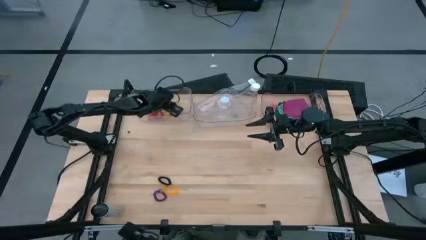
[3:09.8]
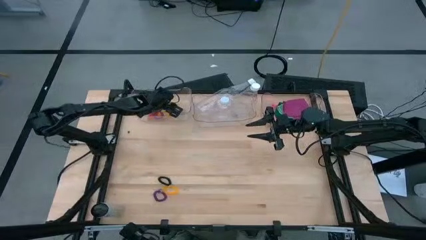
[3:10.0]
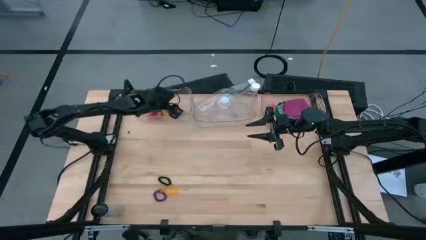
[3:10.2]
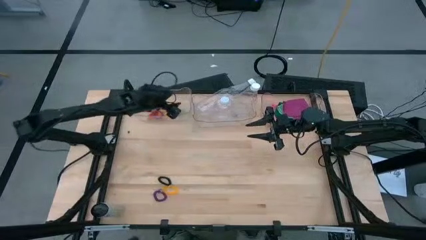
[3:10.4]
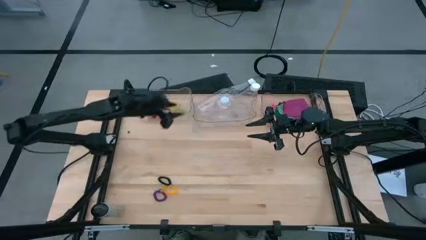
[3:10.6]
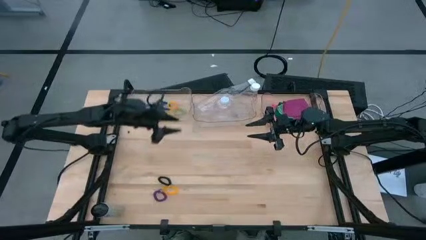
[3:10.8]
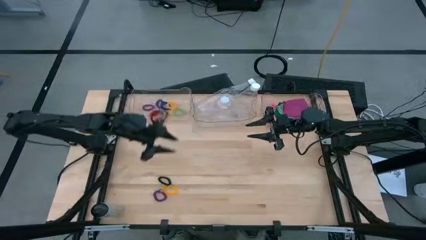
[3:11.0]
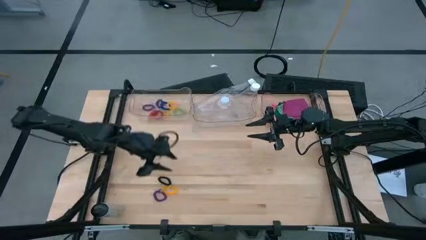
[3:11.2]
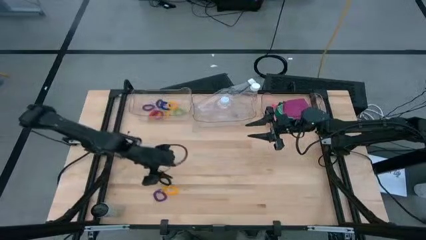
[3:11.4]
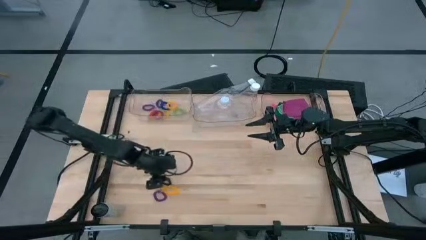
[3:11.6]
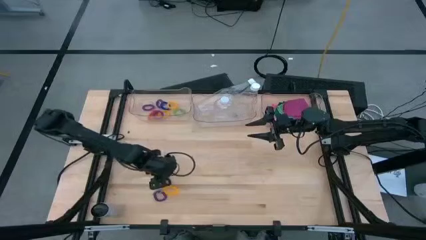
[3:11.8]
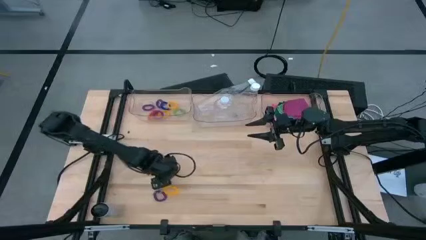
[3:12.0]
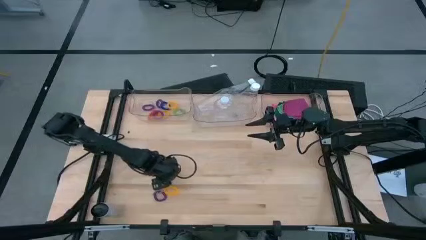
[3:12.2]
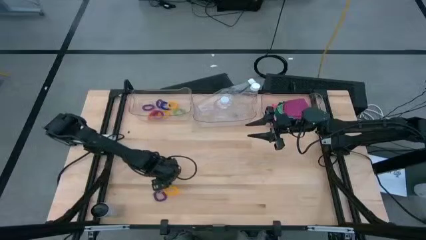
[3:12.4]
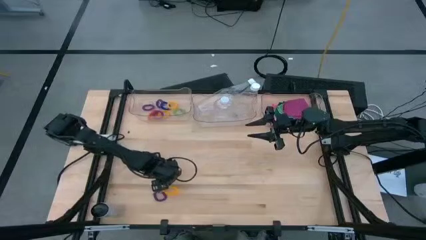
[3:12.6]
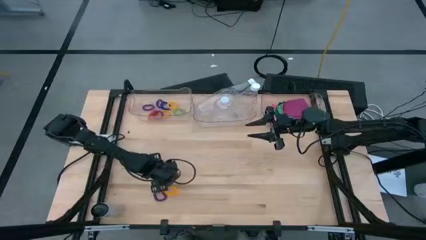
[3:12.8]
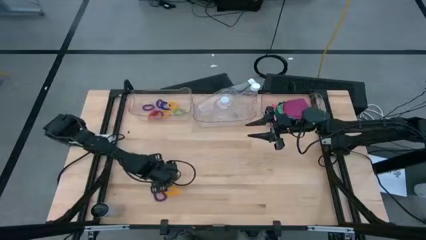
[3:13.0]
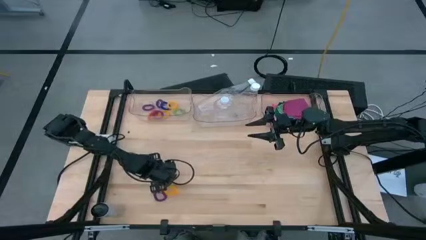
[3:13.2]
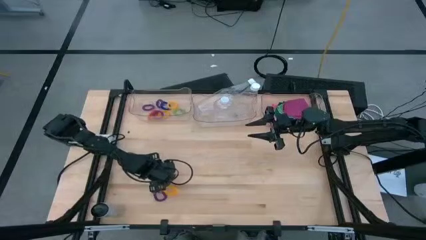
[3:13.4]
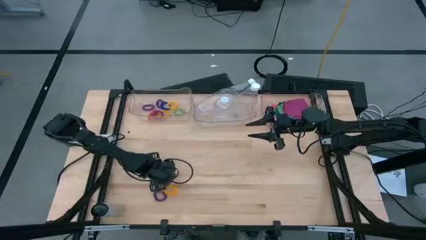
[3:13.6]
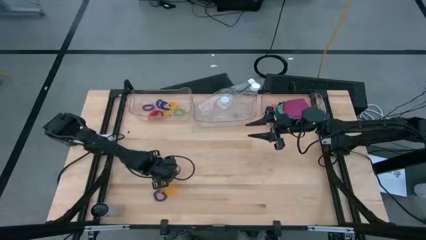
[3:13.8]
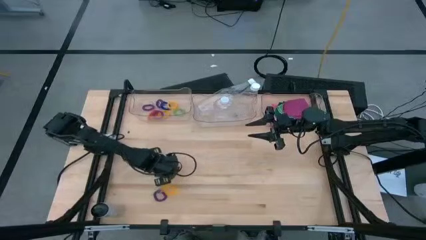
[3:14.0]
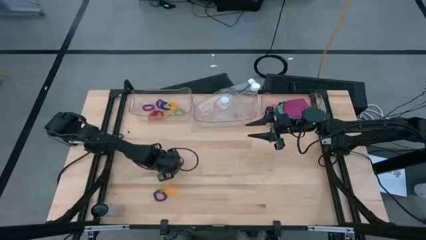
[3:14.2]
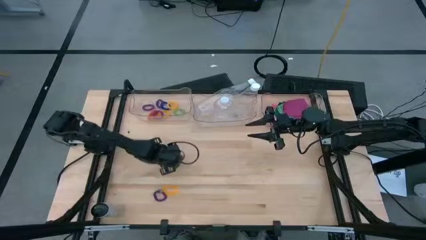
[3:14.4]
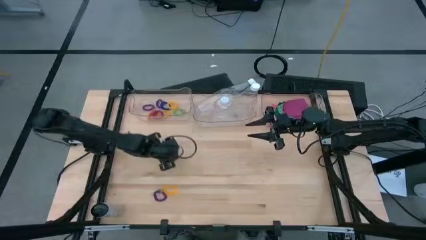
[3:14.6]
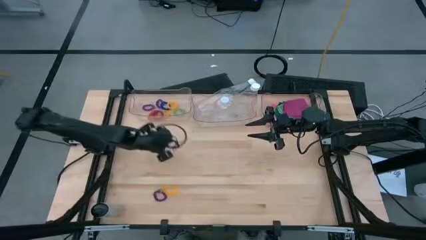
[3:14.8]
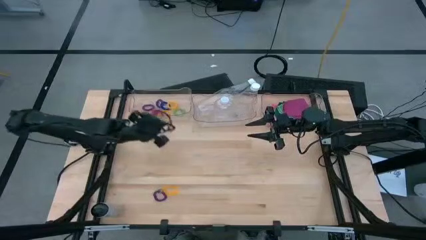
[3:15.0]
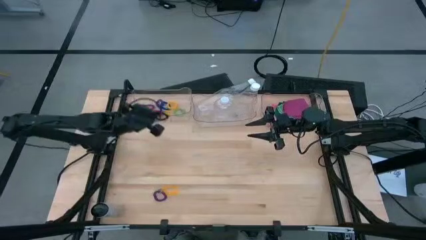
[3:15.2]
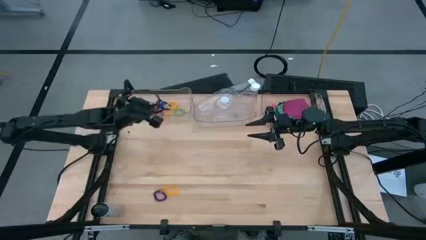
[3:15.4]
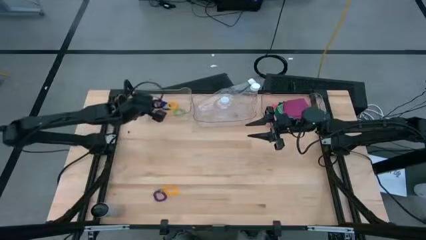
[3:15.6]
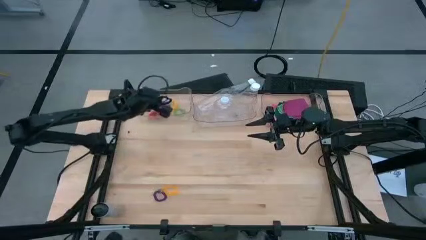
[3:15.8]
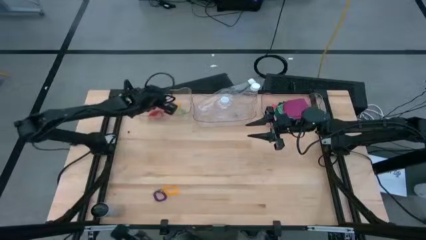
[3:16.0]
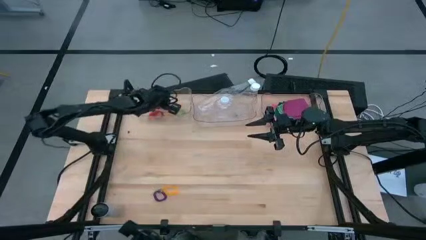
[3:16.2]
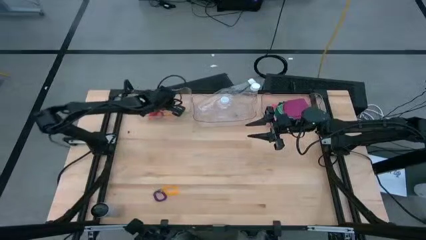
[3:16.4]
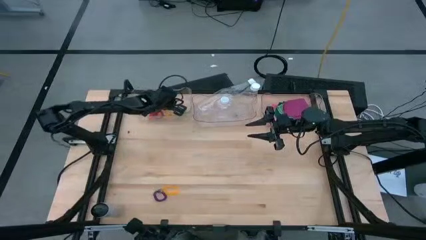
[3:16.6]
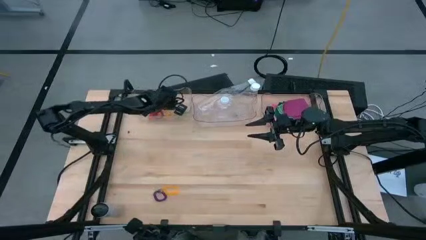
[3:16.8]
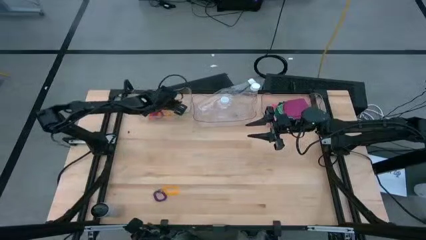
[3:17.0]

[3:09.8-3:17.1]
Task: Pick & Place Sports Items
Put the black spring keychain into the left transparent bin

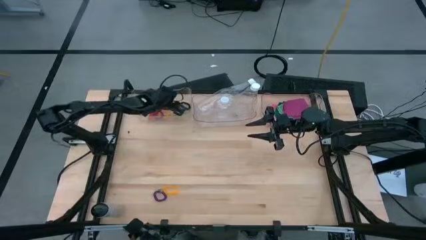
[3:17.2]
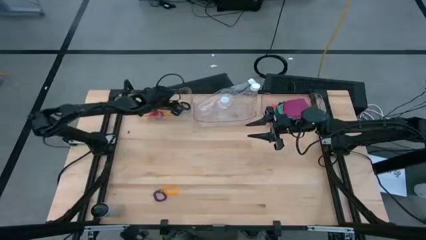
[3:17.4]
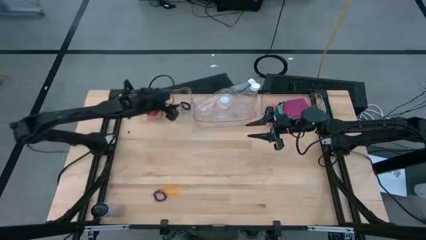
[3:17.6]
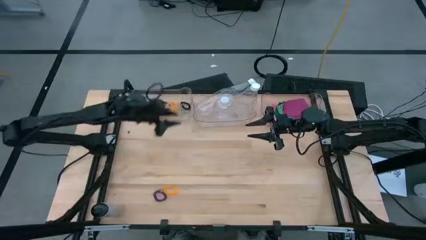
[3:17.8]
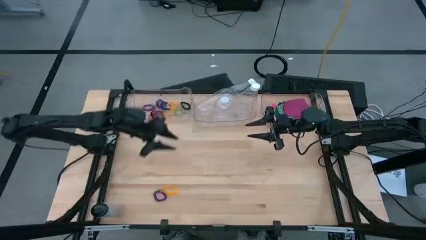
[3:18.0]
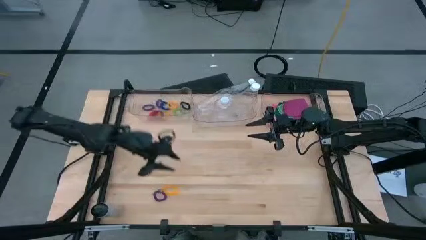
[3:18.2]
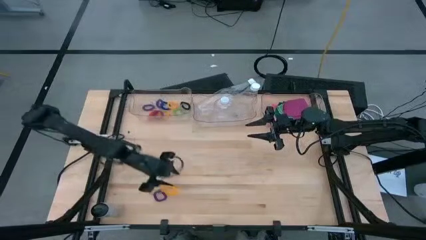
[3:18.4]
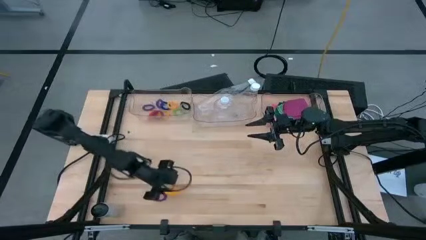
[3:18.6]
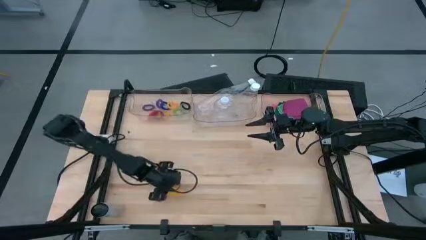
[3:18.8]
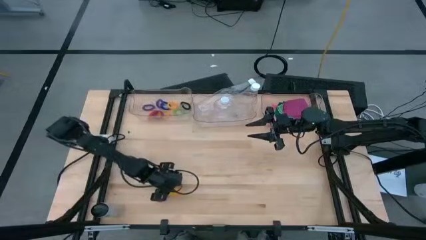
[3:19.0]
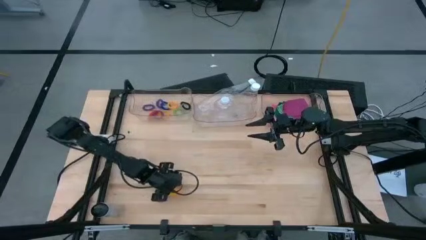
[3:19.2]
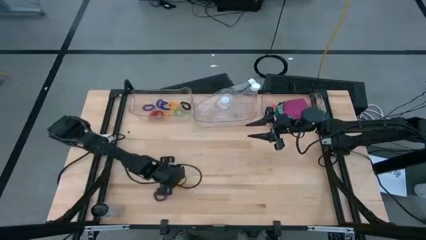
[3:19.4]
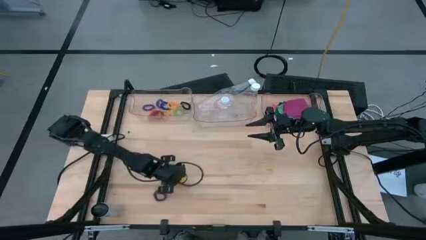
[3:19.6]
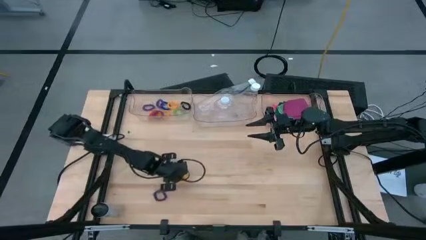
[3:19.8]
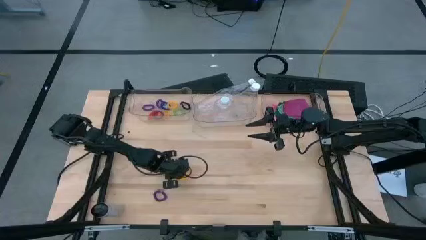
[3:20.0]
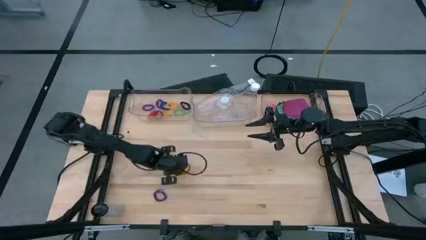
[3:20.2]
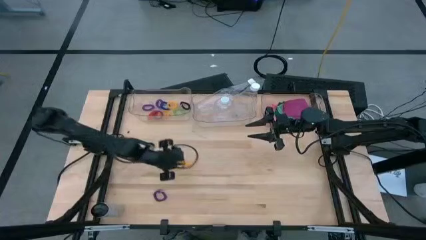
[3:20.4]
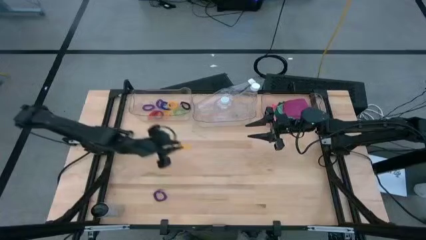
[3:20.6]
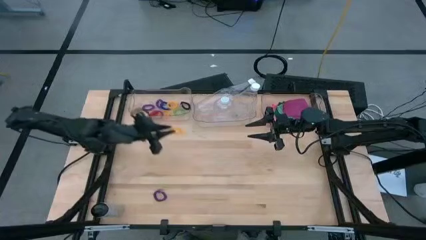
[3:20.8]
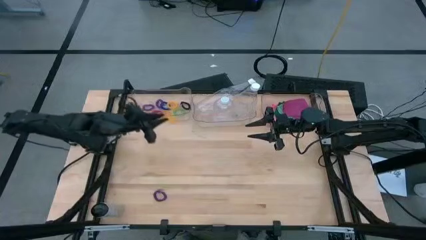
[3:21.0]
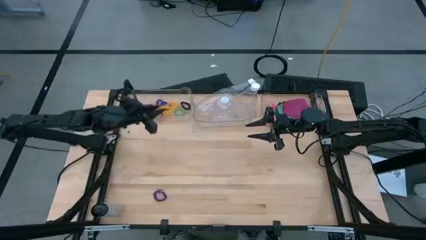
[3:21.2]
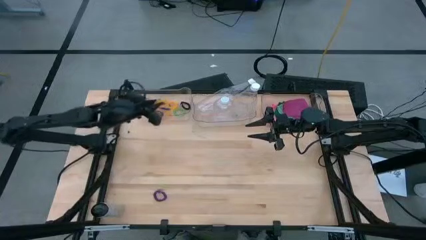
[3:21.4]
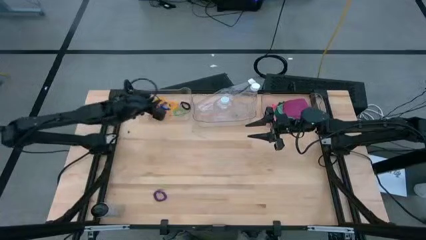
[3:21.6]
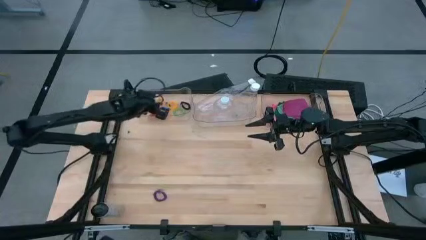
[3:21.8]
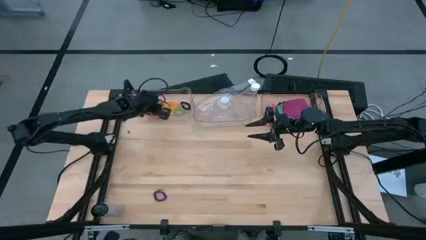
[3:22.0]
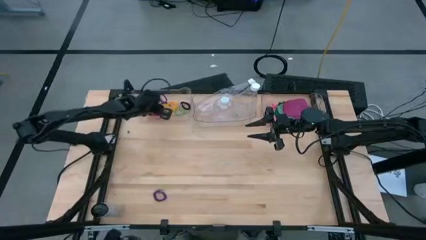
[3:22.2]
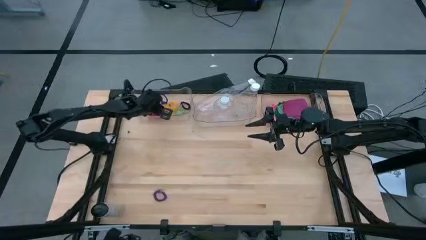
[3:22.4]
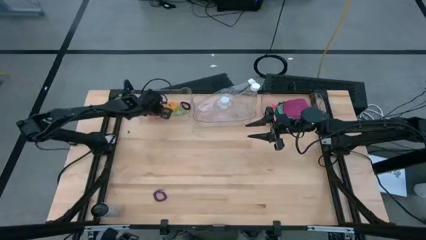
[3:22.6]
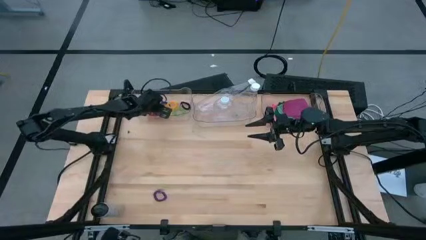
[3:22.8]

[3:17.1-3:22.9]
Put the yellow spring keychain into the left transparent bin

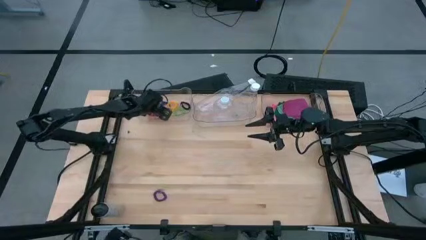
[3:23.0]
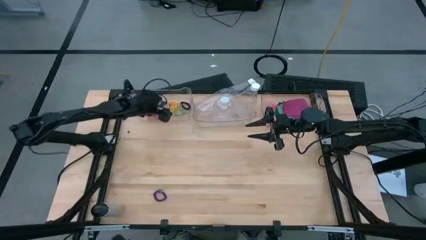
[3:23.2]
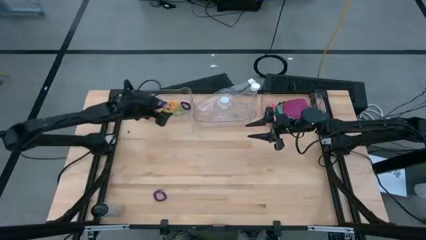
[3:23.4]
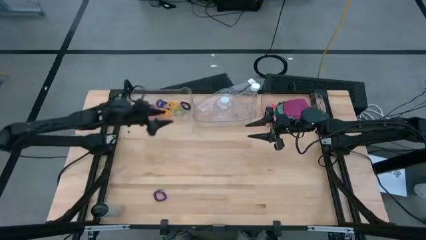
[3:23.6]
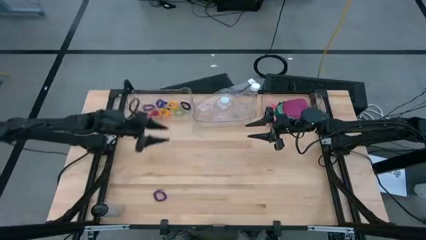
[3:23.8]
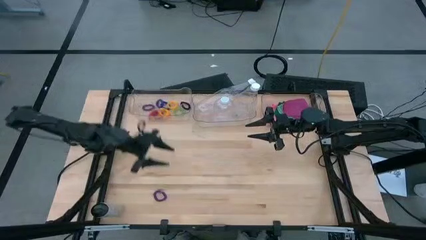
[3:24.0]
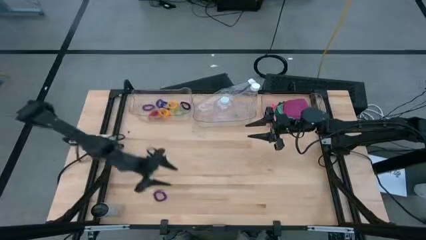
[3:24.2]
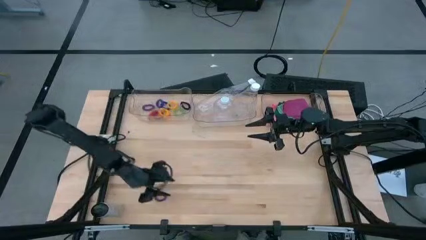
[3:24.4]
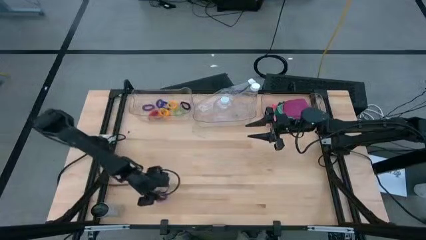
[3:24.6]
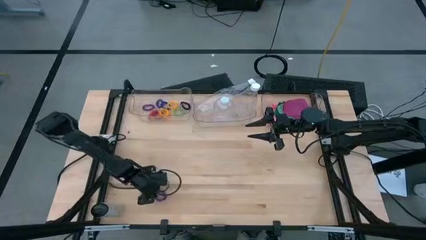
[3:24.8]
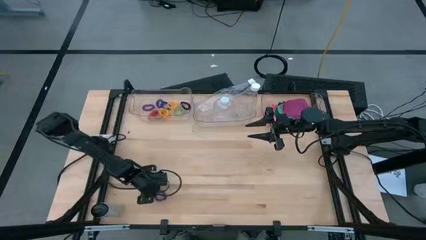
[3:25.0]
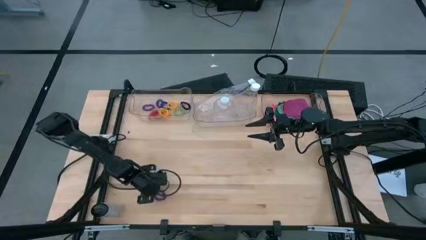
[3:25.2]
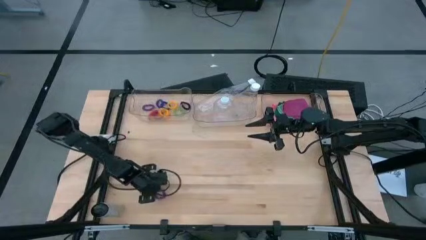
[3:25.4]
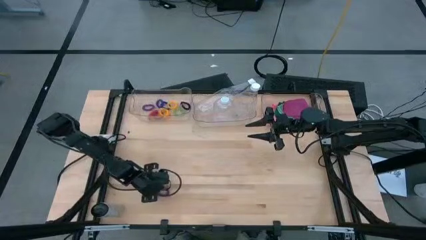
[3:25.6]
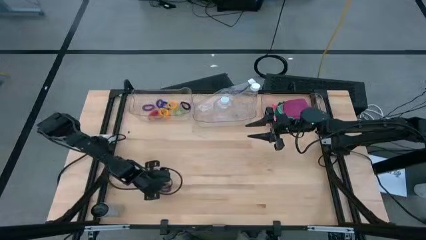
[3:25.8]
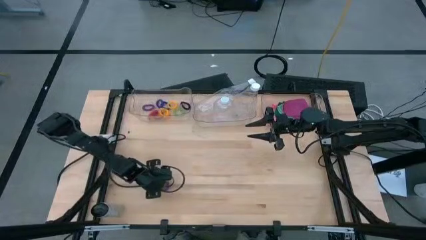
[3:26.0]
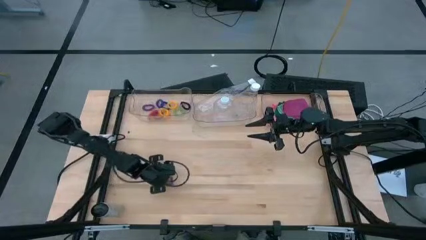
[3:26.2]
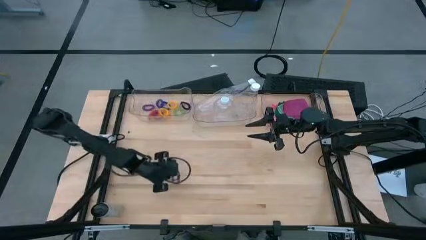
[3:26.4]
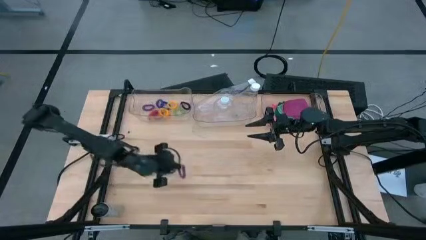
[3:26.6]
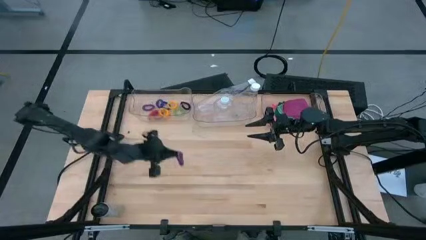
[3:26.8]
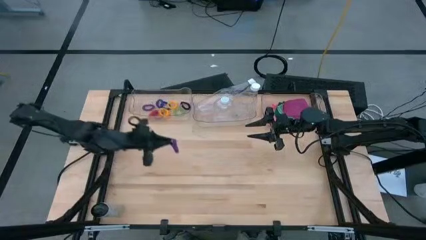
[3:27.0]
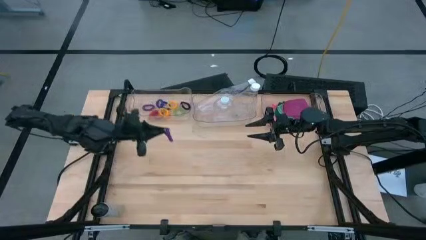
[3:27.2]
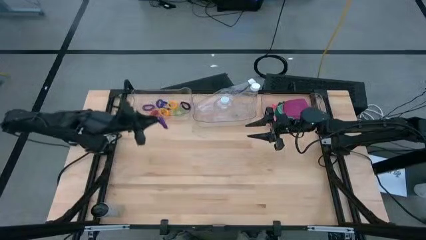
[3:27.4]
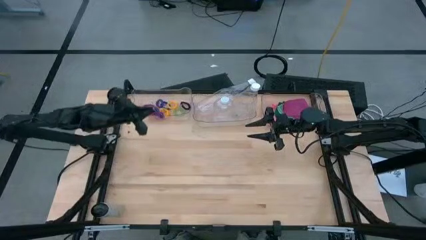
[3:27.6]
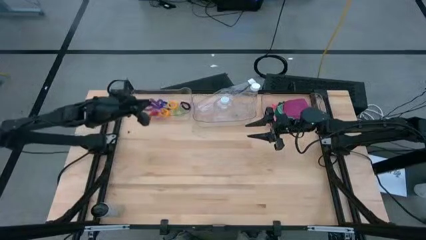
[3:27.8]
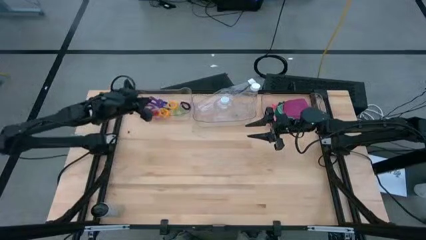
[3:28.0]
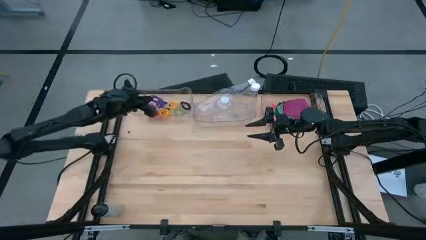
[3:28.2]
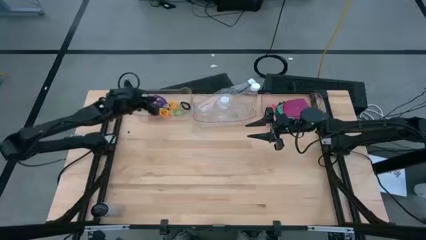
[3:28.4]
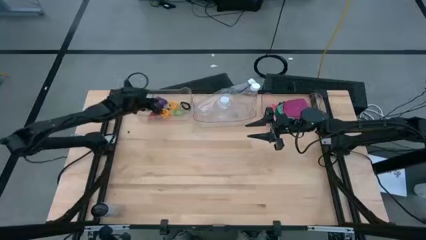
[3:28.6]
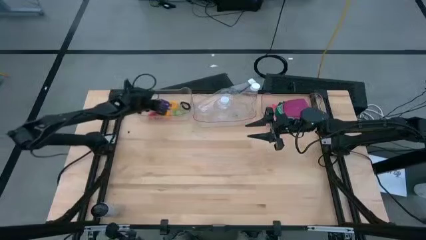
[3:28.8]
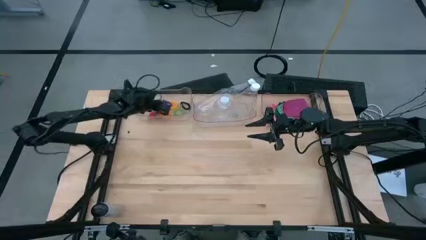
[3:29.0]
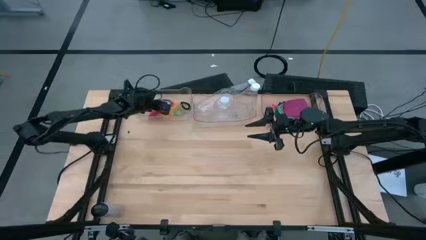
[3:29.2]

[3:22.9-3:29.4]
Put the violet spring keychain into the left transparent bin
